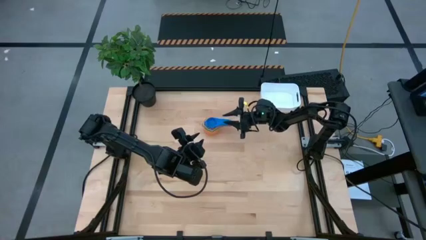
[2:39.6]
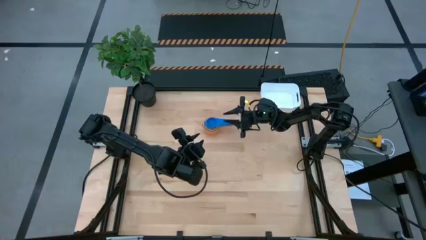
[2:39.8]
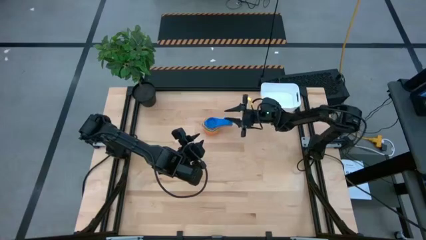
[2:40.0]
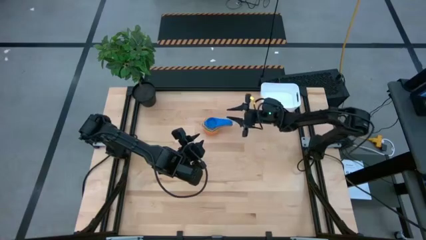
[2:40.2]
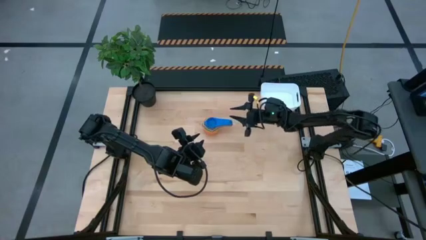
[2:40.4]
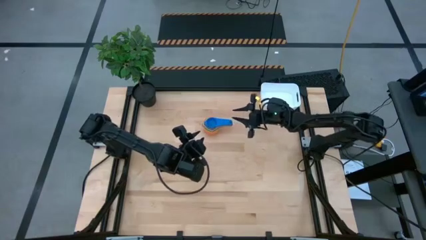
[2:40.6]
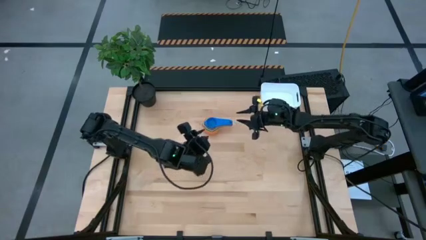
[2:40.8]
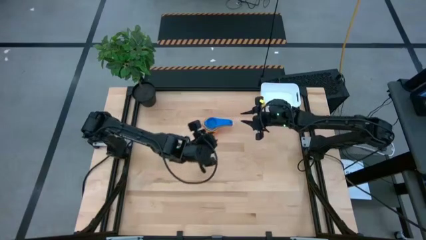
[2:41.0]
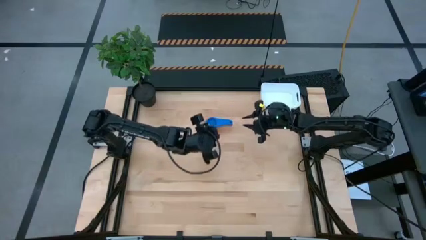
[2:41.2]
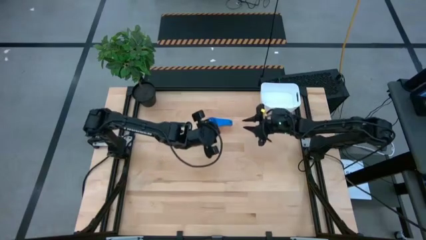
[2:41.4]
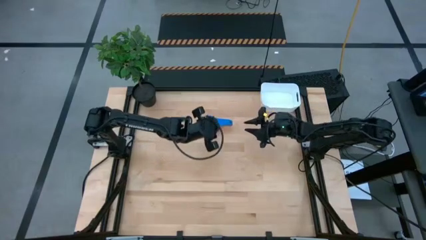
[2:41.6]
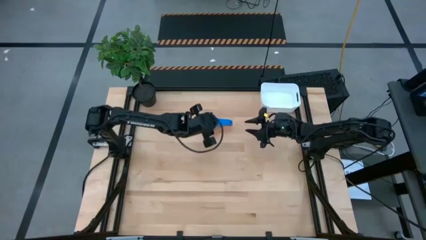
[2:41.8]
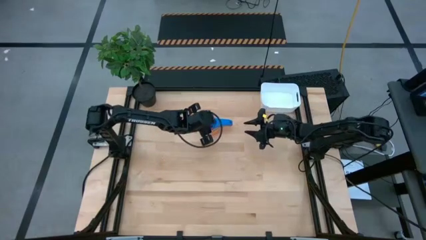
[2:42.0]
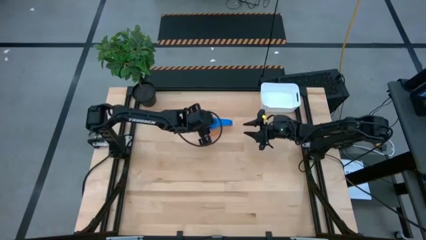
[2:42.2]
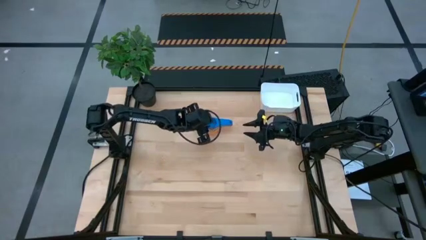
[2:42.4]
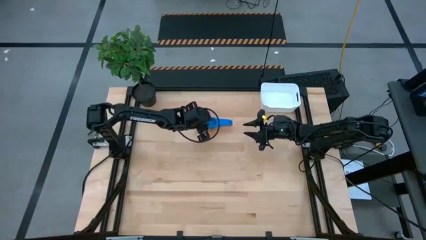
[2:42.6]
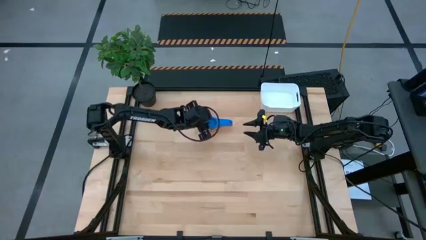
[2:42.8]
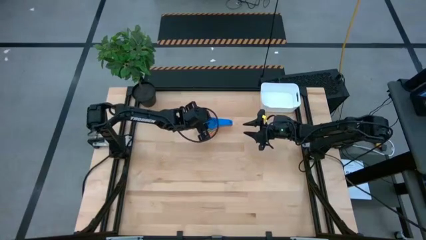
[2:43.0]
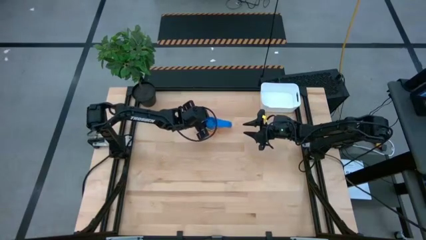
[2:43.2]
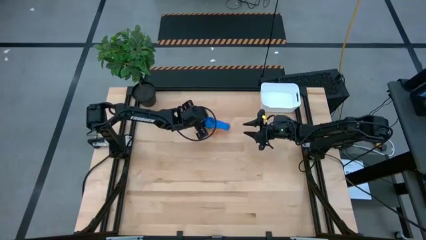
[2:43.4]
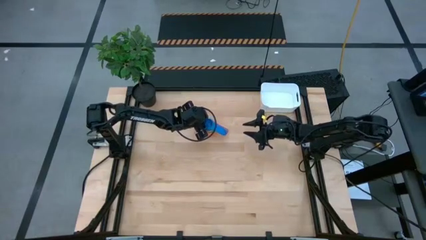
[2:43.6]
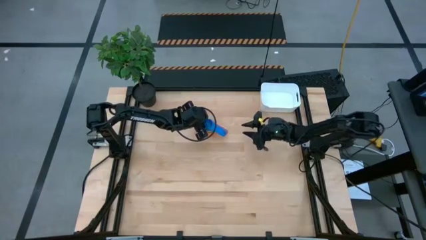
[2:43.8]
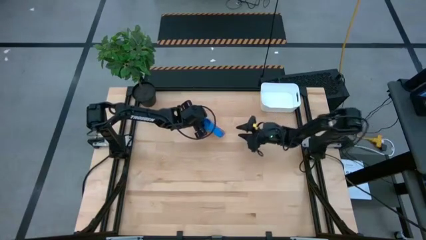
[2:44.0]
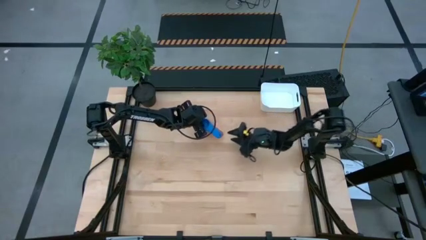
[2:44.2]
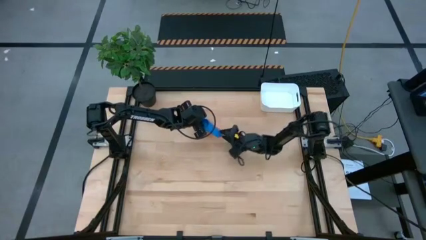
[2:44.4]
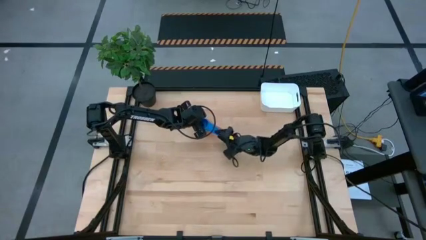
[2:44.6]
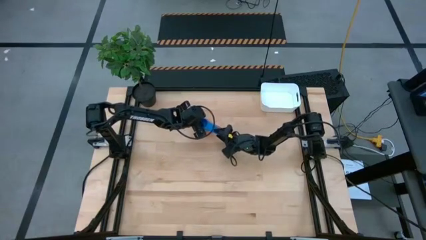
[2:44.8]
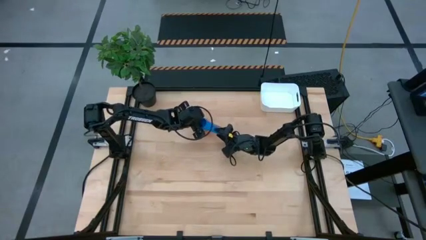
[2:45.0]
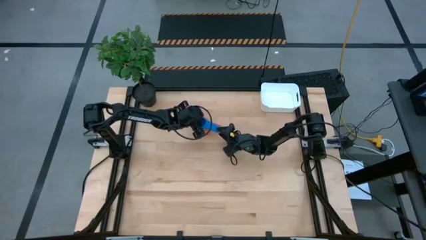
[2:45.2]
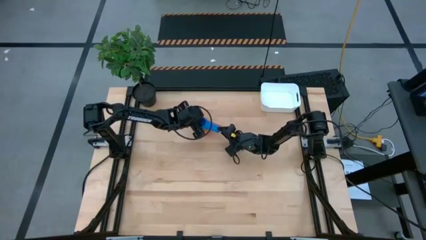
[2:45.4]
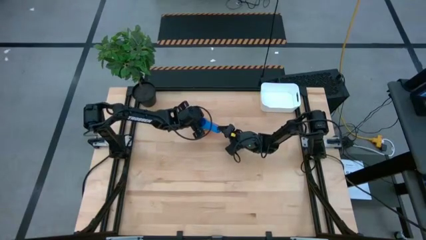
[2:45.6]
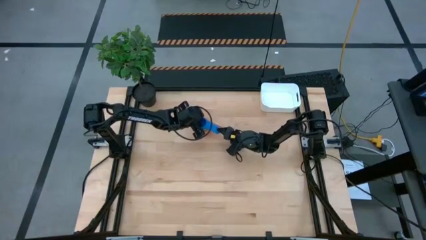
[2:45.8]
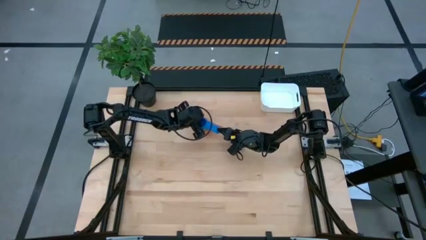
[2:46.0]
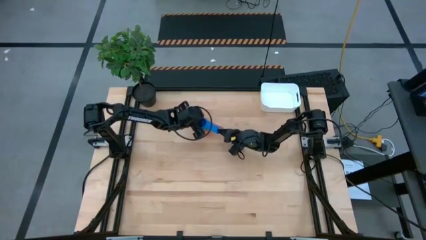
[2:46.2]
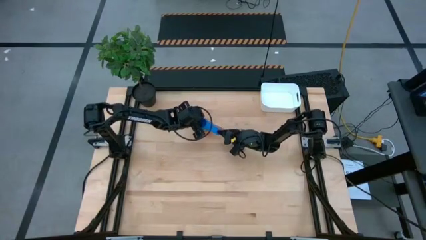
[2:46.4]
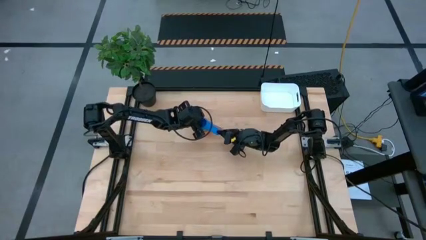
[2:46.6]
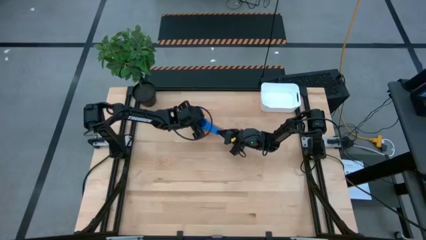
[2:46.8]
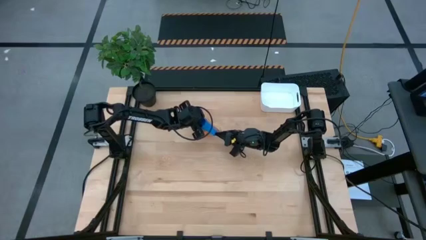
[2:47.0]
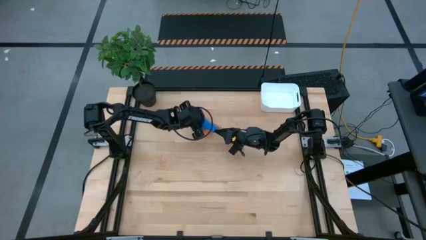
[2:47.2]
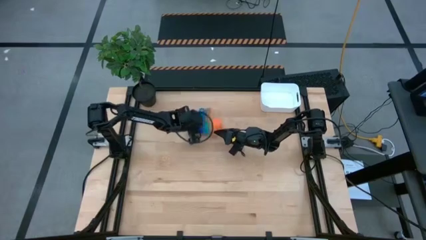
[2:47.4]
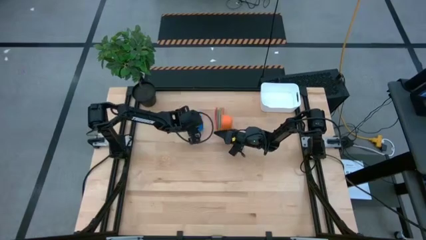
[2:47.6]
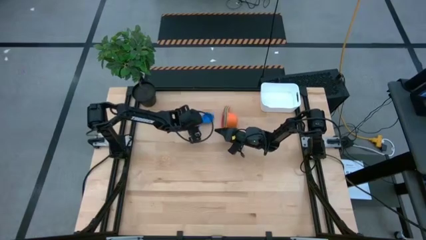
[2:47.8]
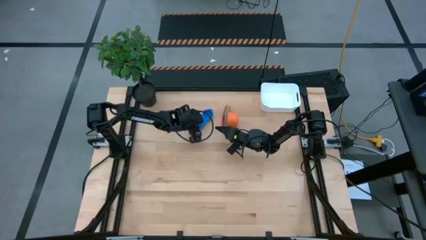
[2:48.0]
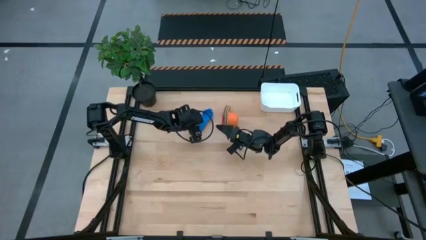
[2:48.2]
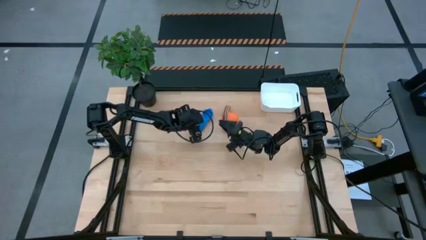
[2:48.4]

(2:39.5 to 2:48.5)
Task: Nest measuring cups in basket
Put the stacked measuring cups into the white bin

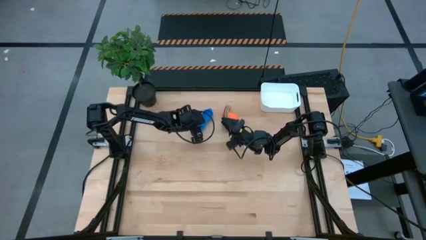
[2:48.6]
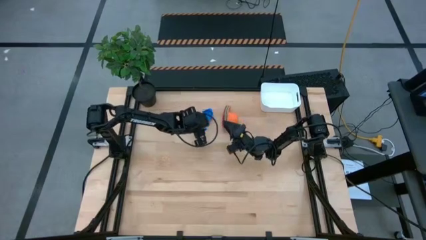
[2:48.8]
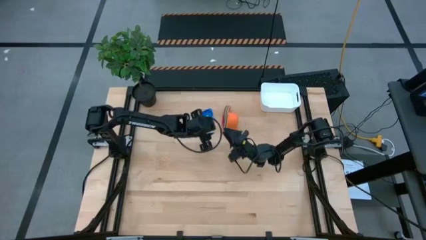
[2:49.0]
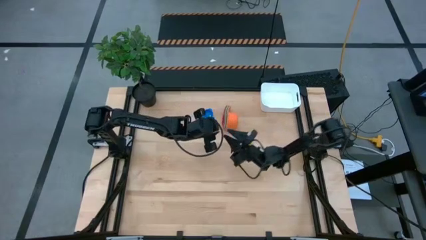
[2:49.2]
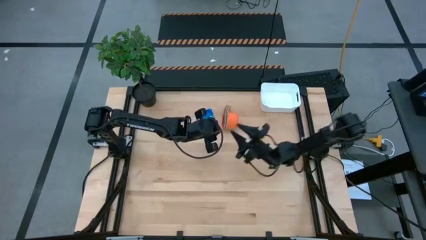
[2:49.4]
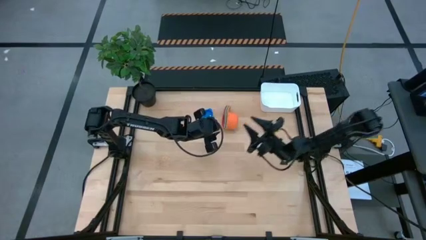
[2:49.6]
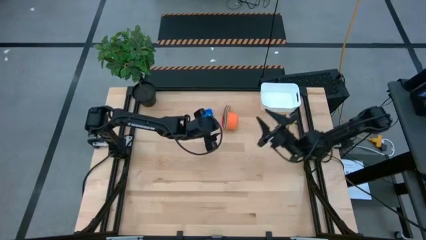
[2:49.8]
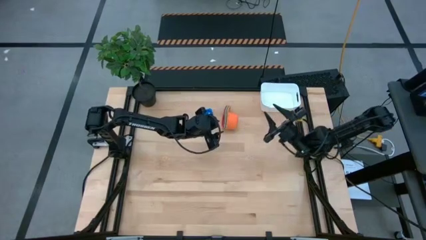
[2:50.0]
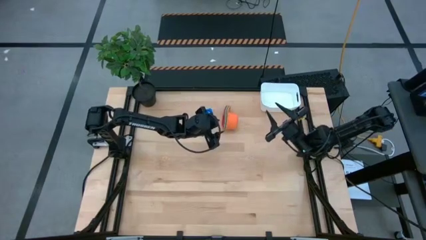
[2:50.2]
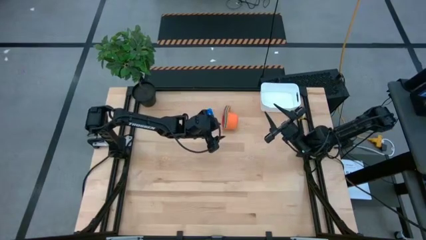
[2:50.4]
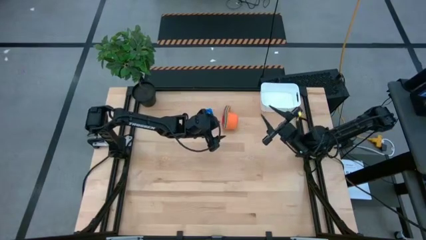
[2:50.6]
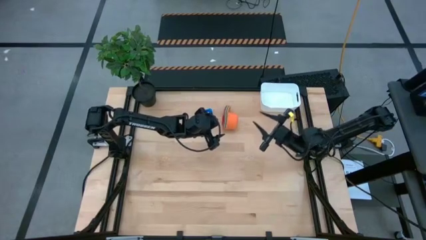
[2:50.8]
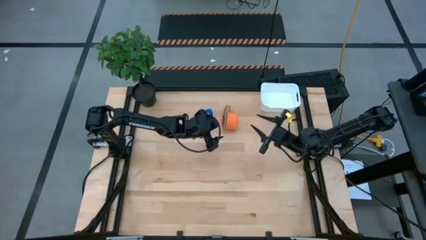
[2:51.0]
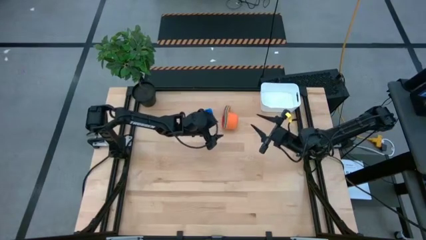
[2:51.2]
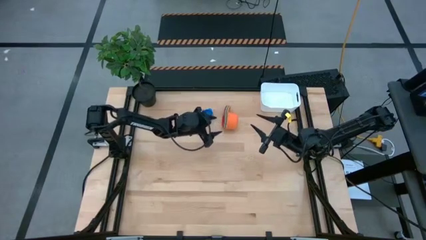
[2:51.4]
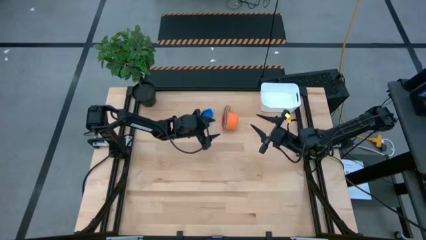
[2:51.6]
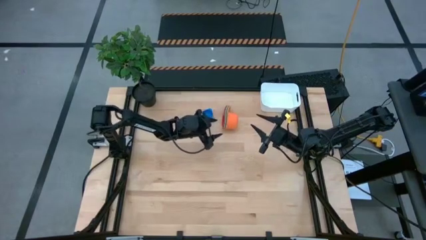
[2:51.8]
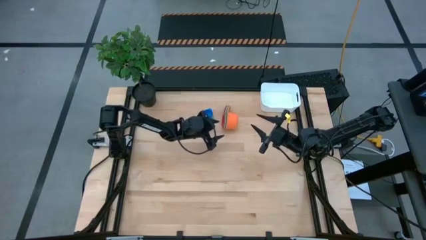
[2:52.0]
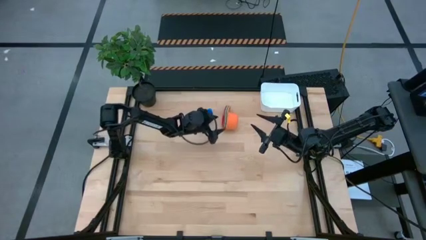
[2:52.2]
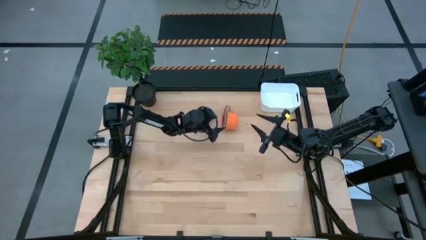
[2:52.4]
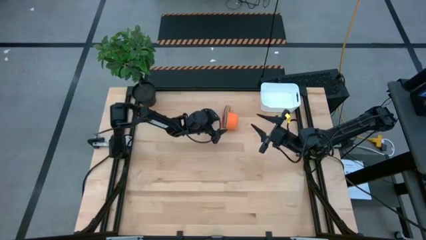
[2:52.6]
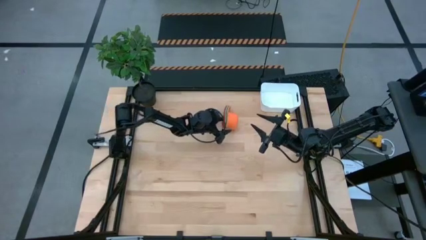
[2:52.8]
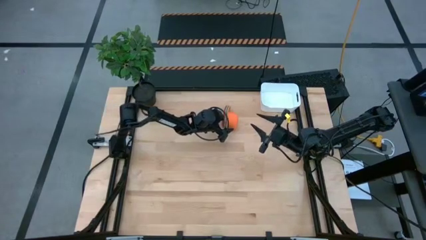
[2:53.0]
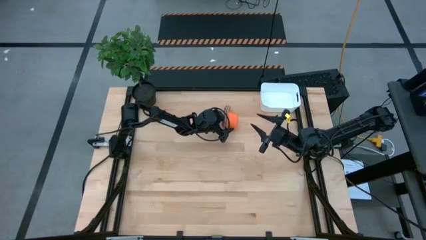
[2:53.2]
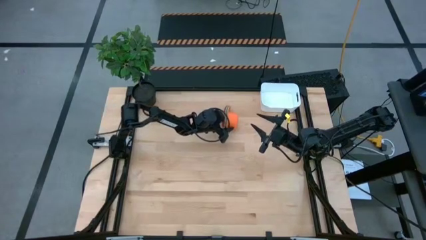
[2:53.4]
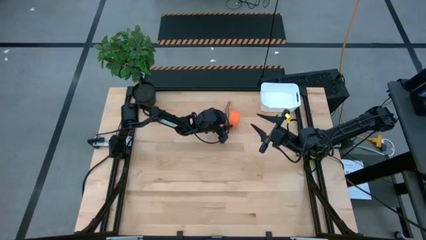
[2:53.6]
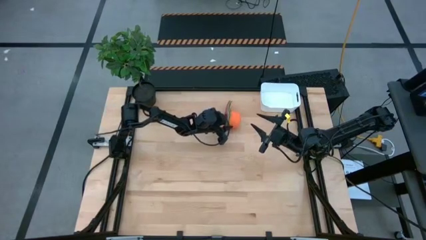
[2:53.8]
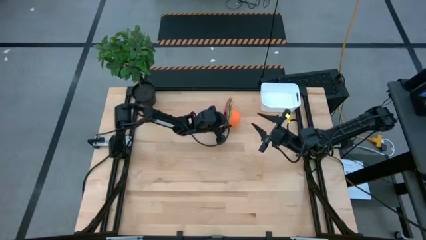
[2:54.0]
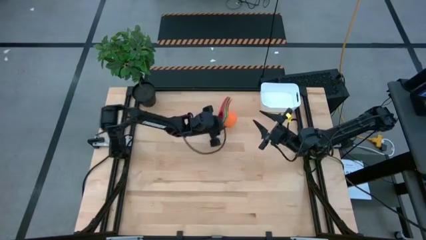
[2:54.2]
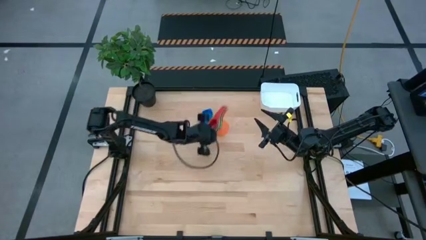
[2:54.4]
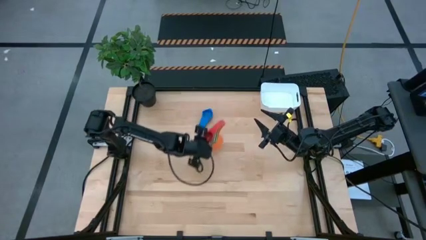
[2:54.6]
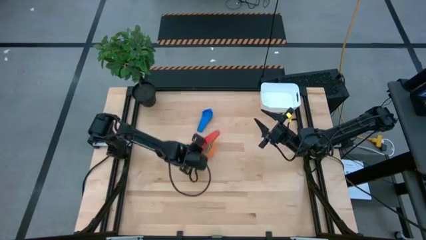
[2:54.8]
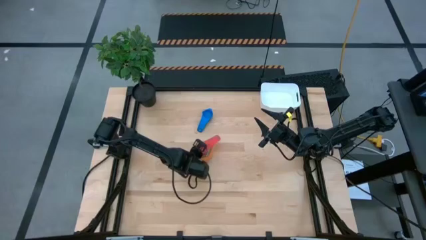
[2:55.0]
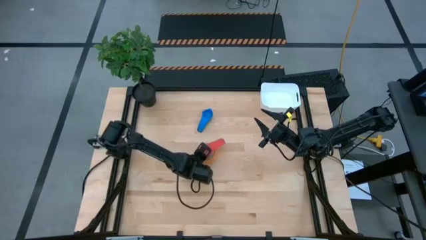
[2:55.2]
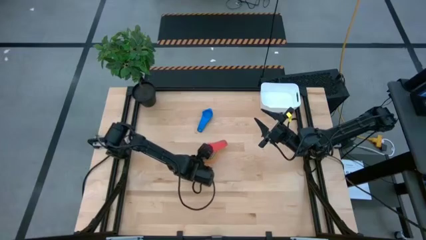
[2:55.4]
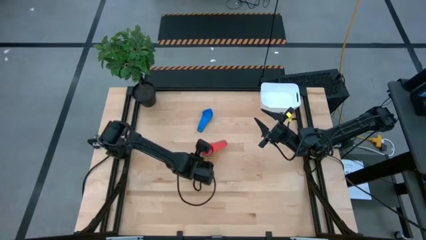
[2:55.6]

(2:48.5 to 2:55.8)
Adjust the stacked measuring cup
